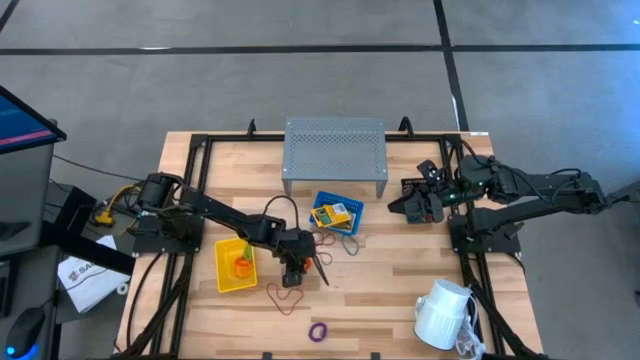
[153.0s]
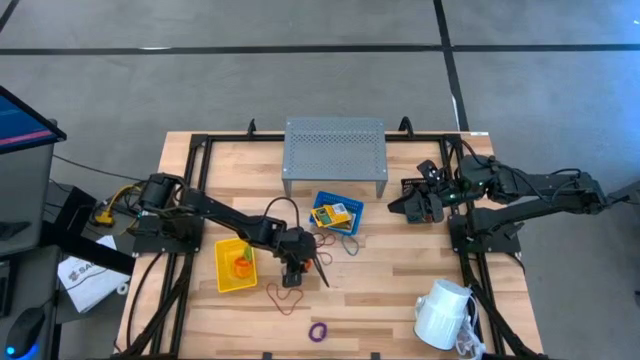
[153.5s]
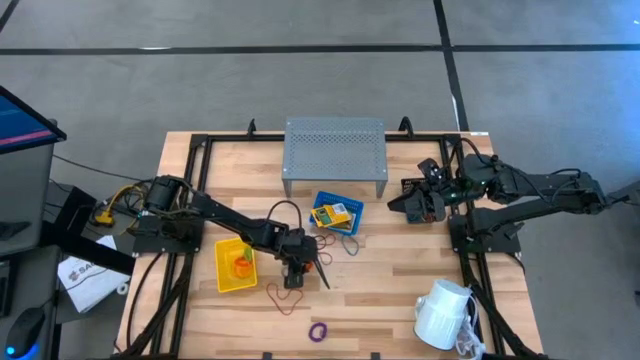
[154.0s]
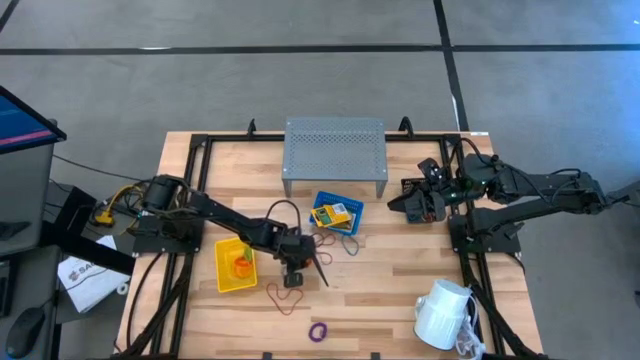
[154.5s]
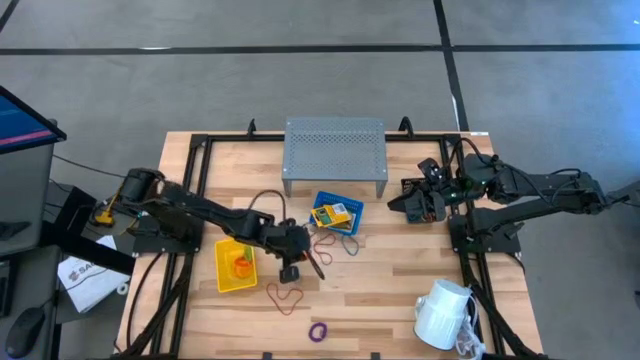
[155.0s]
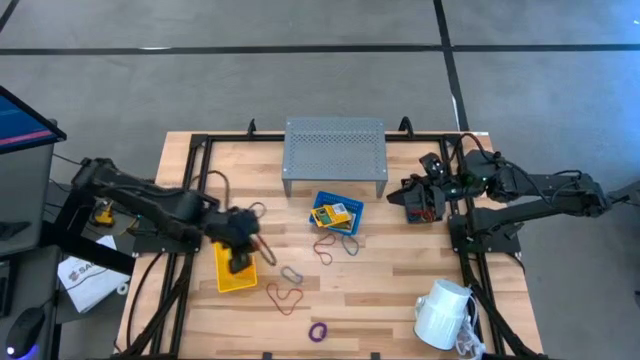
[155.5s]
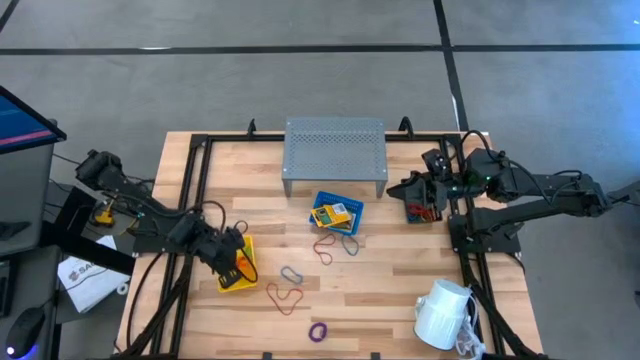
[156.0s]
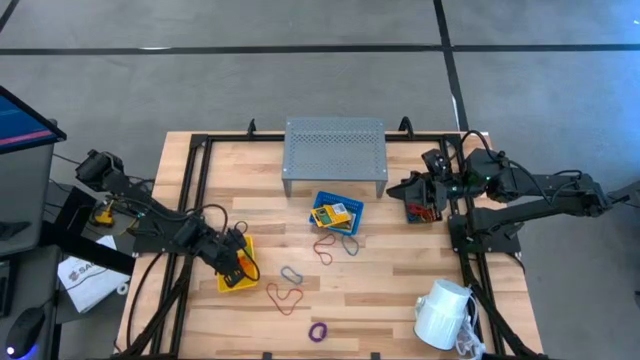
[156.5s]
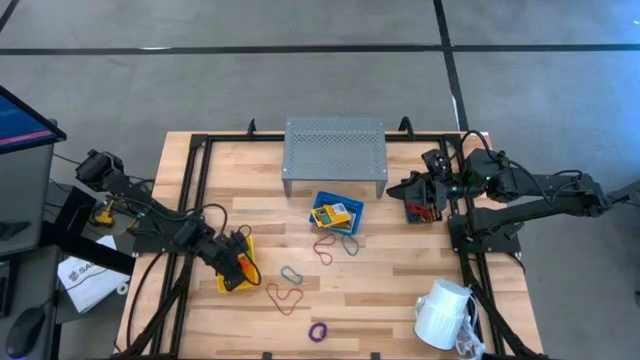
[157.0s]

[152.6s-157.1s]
Task: Pick & Place Office Desk Supplies
Put the orange spring keychain into the yellow bin

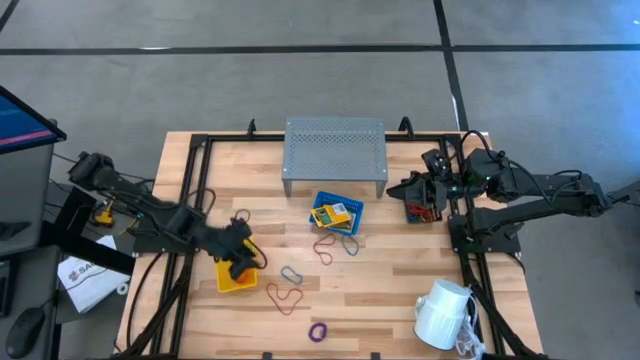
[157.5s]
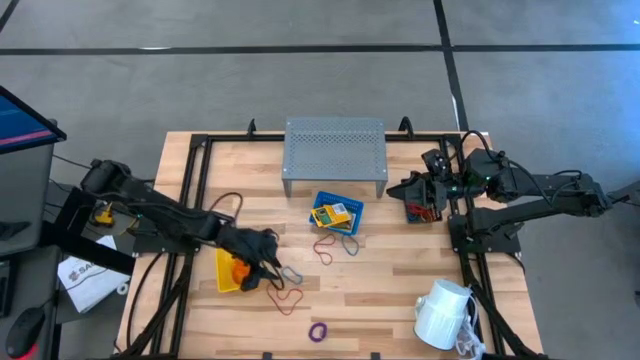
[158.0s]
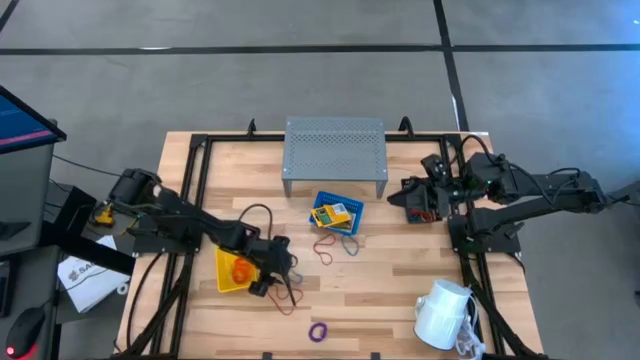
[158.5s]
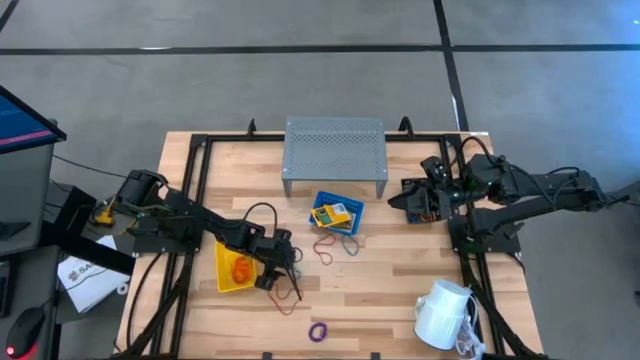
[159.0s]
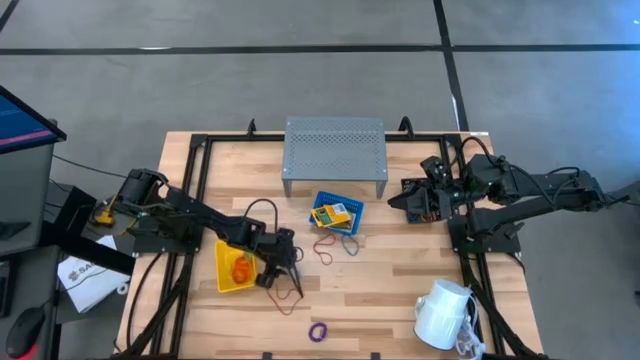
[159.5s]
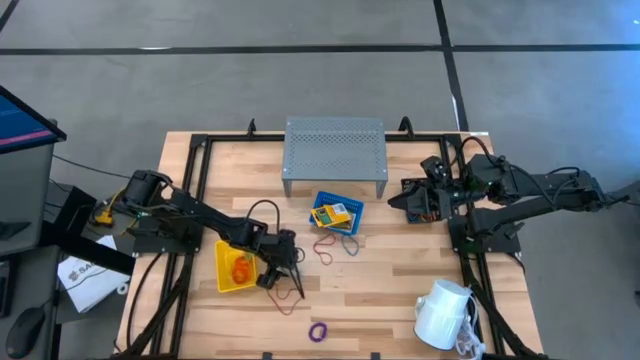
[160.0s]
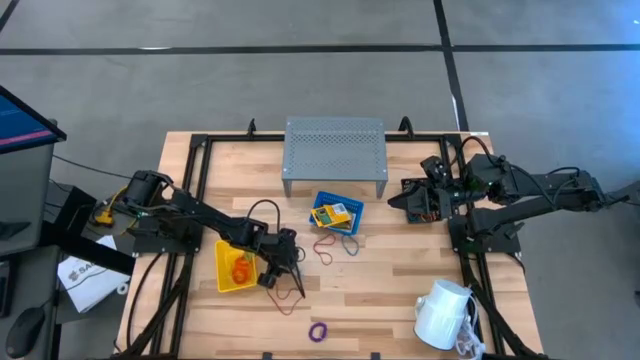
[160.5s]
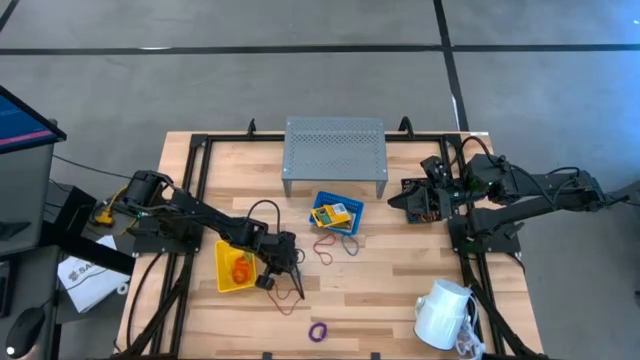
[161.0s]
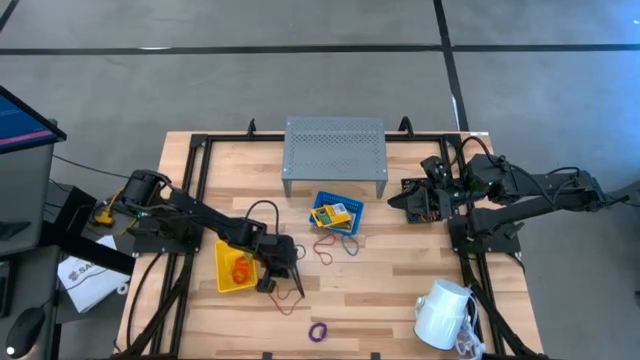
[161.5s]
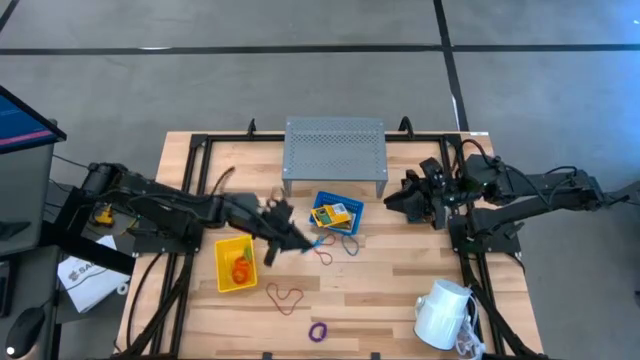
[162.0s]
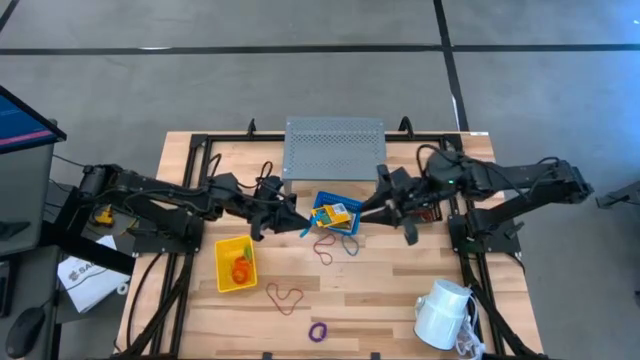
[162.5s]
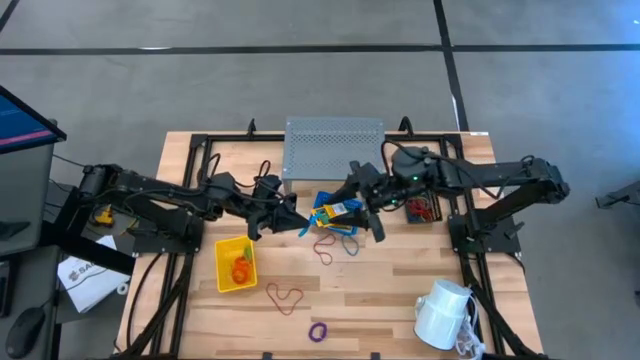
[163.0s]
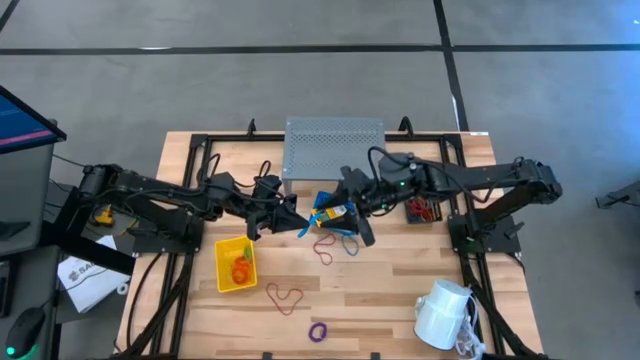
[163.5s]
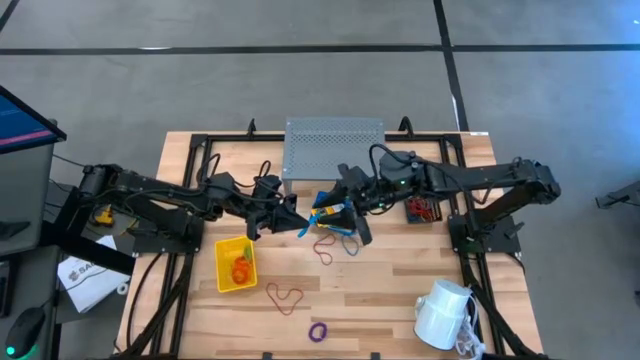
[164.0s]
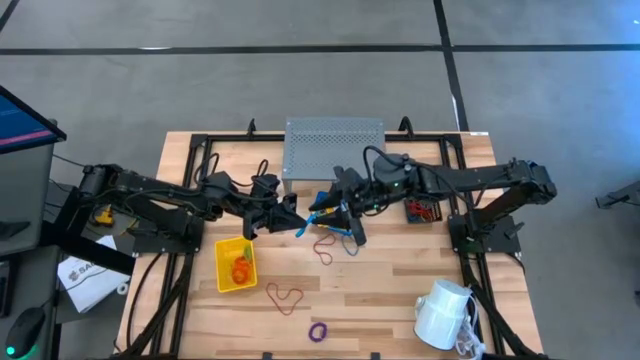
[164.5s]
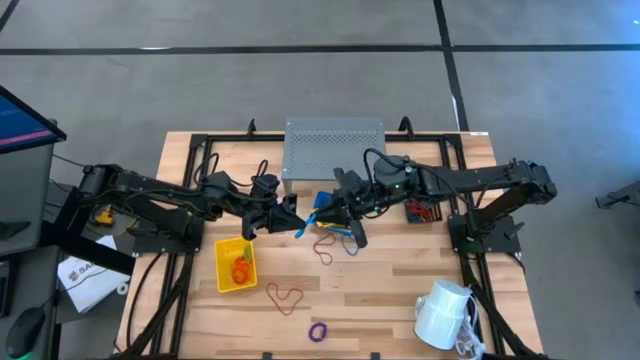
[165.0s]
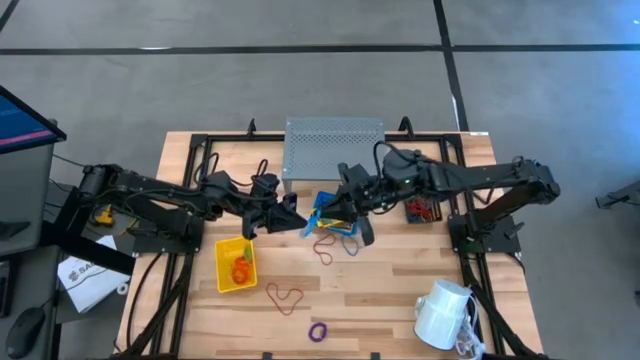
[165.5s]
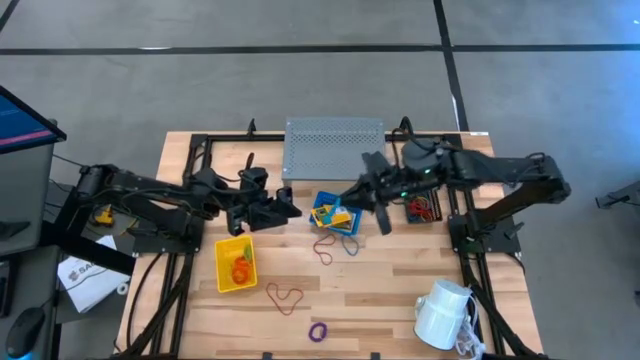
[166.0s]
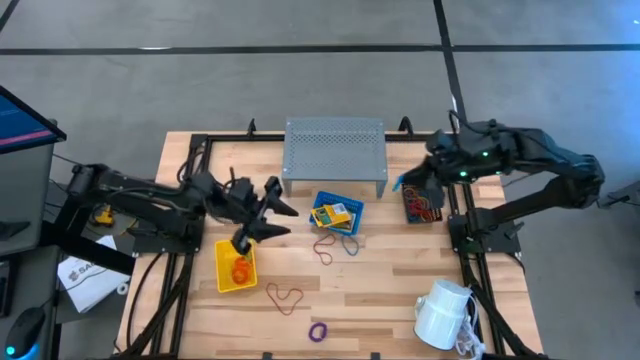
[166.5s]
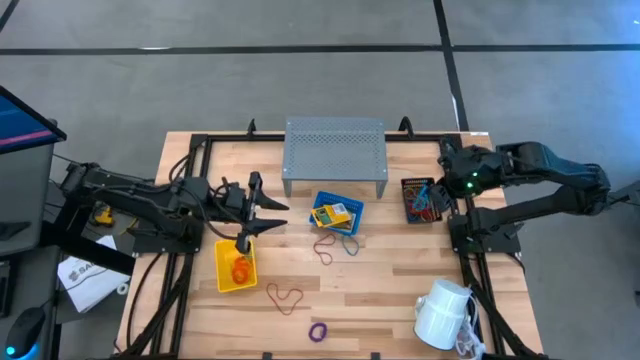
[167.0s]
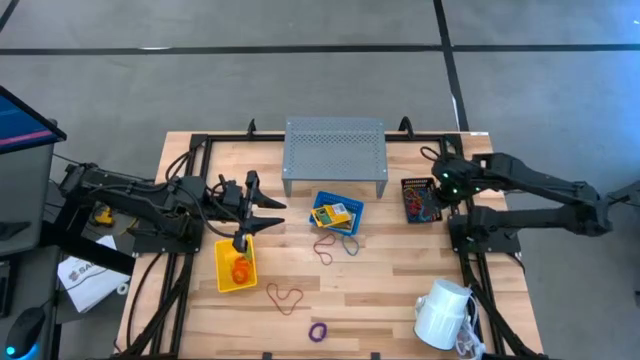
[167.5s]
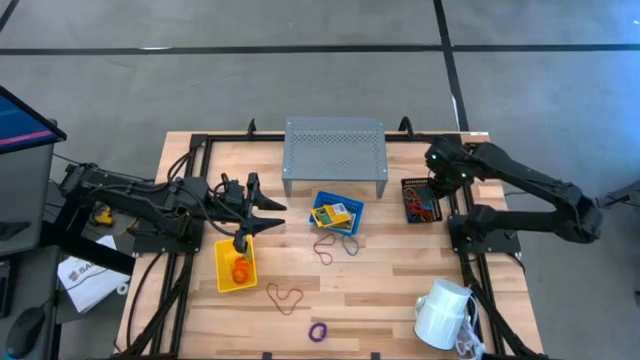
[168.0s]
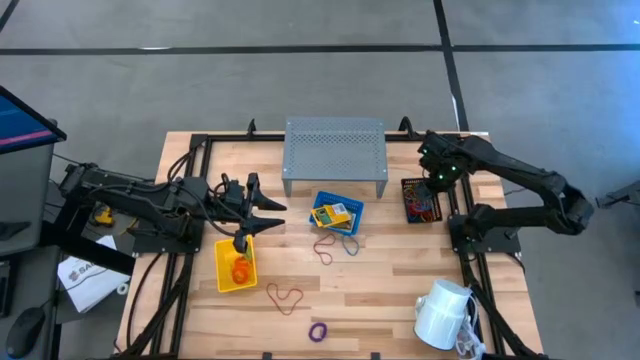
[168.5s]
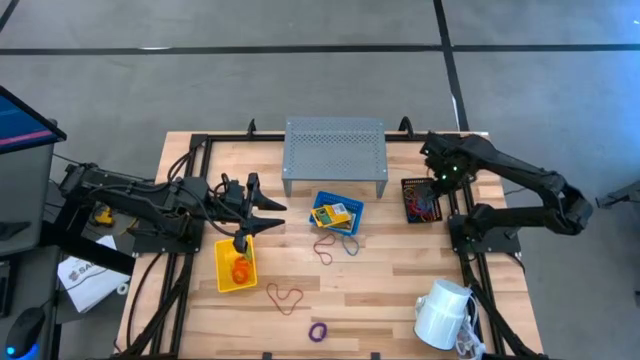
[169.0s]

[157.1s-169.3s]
Put the blue rubber band into the black bin

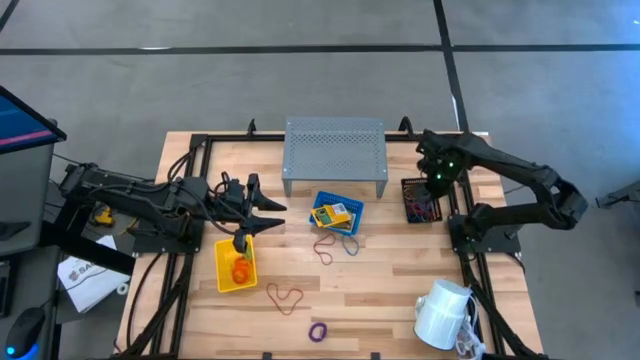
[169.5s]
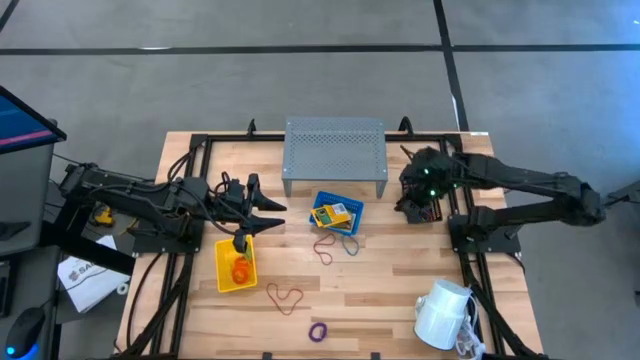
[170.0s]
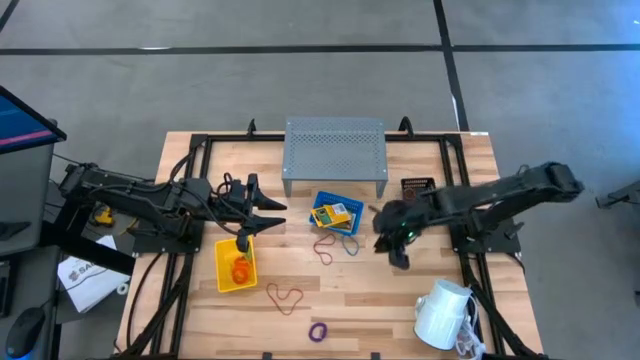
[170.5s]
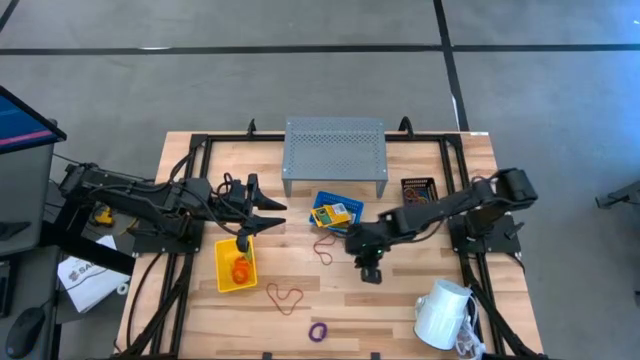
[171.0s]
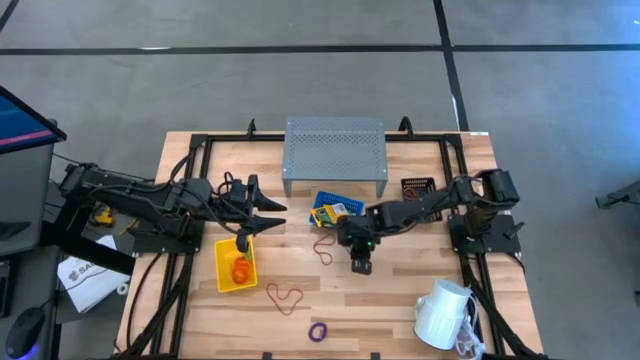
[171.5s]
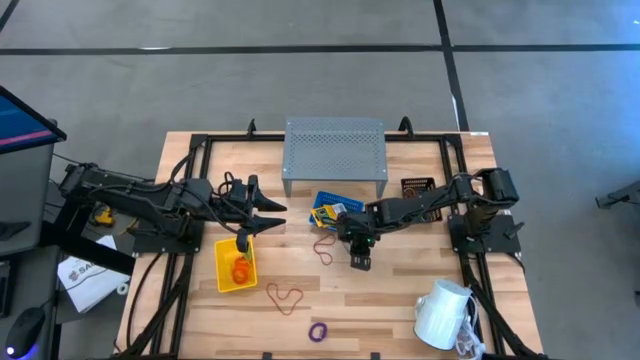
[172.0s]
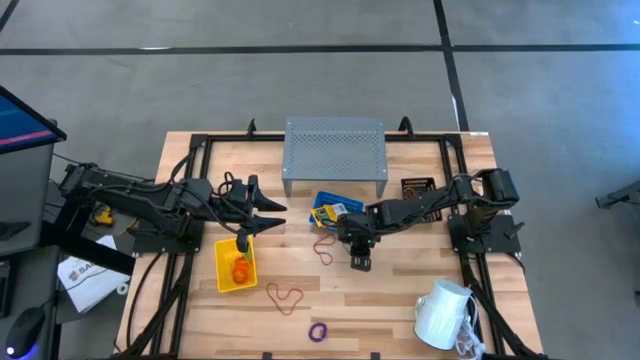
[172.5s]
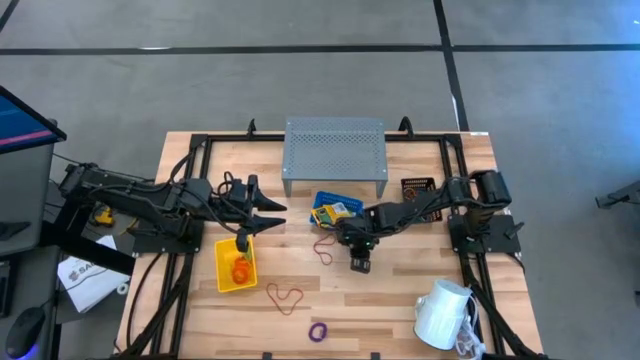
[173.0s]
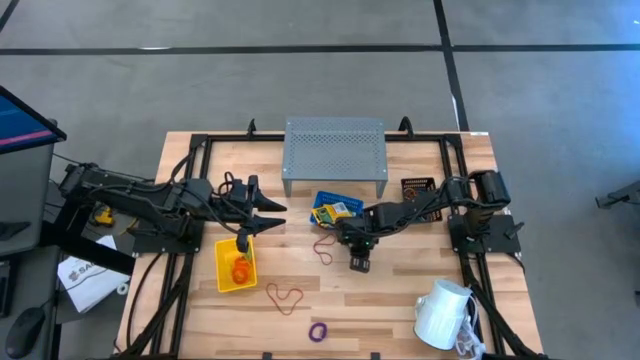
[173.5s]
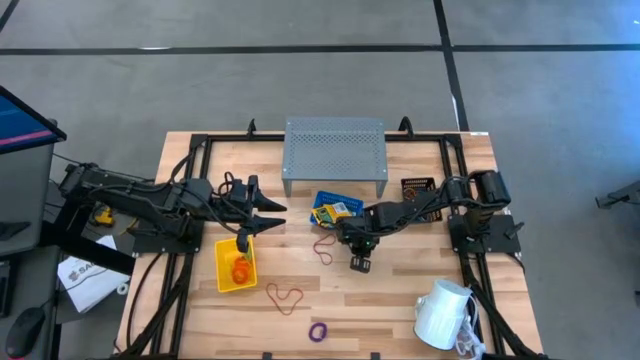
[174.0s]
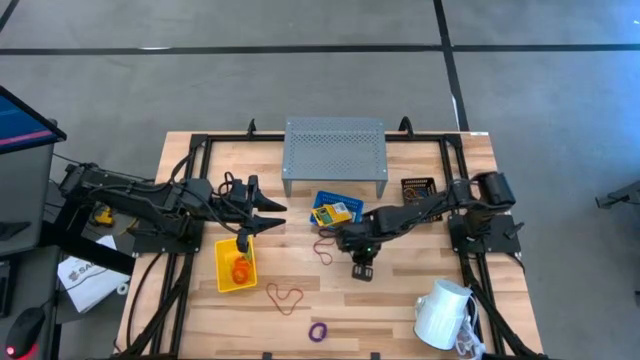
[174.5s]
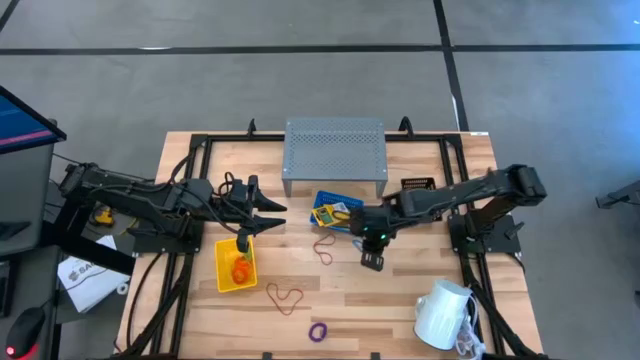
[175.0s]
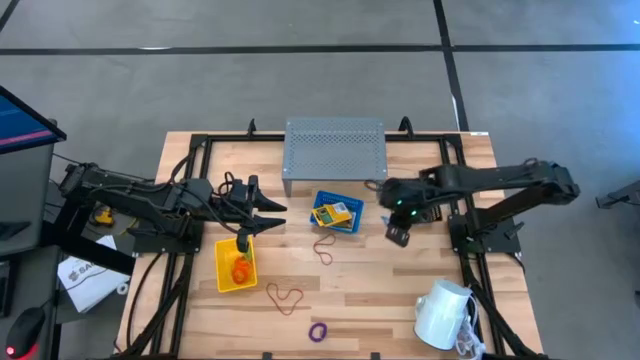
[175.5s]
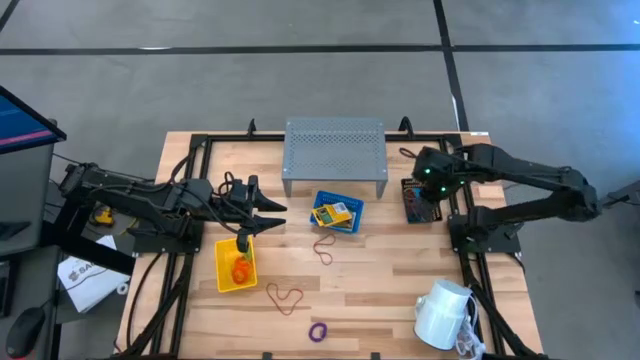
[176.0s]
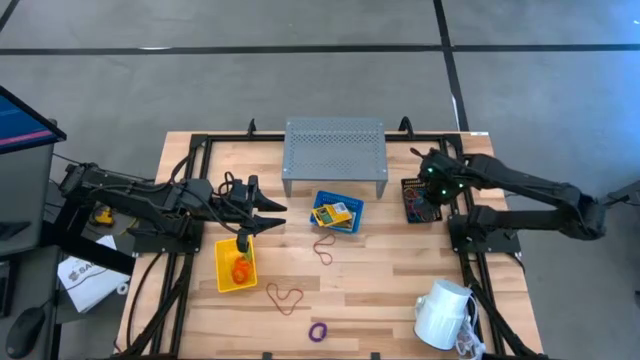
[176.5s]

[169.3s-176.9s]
Put the blue rubber band into the black bin
